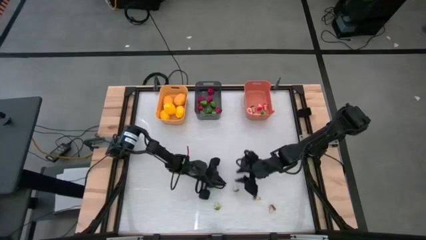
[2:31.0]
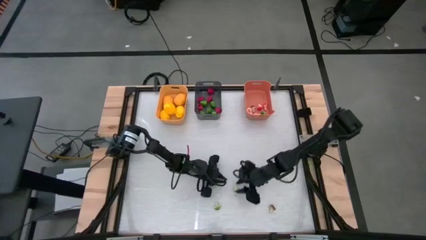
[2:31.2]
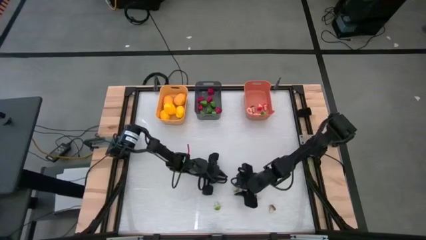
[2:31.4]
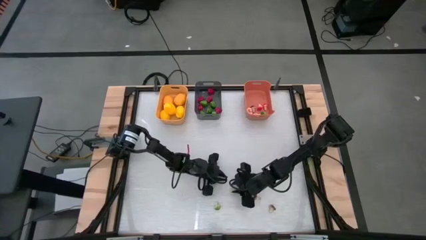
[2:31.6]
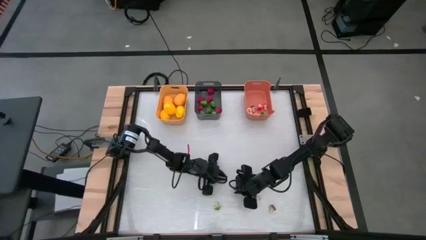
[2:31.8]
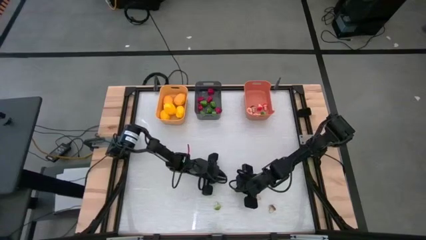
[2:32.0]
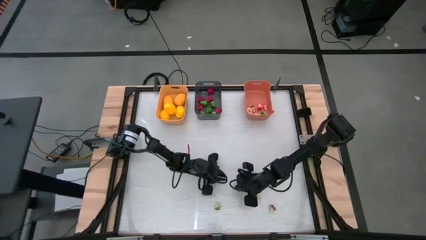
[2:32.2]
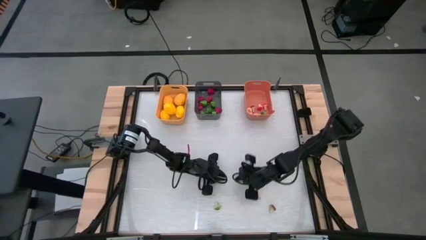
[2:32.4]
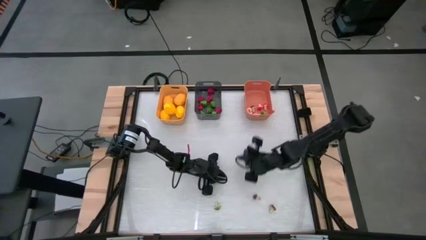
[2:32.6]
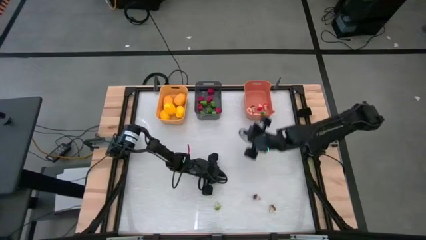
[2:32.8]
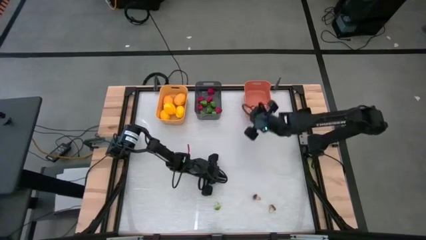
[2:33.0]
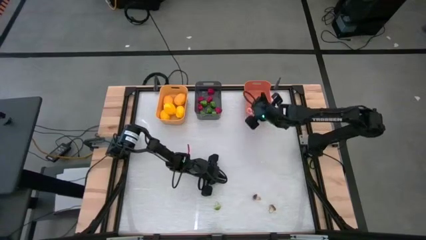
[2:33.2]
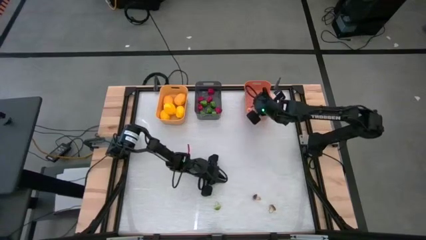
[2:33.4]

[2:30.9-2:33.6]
Task: Sort produce into baskets
Put the green mushroom into the orange bin

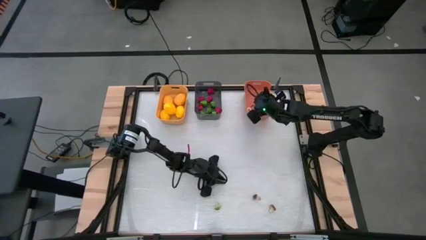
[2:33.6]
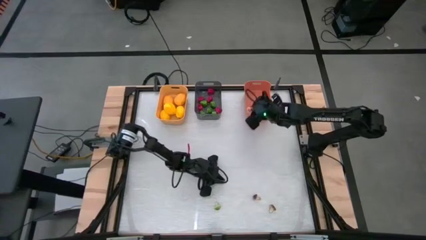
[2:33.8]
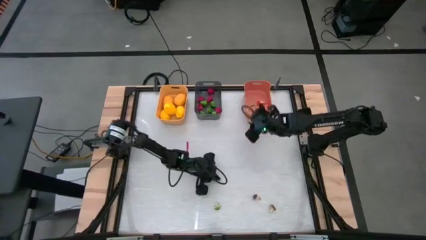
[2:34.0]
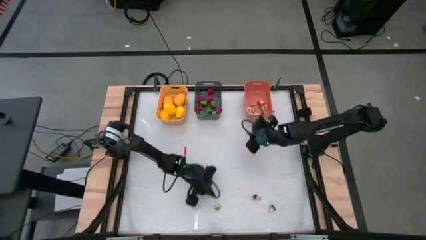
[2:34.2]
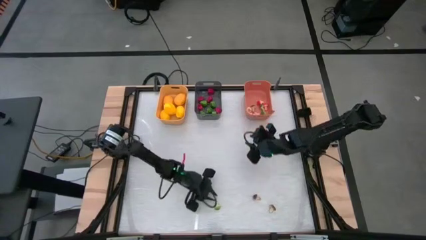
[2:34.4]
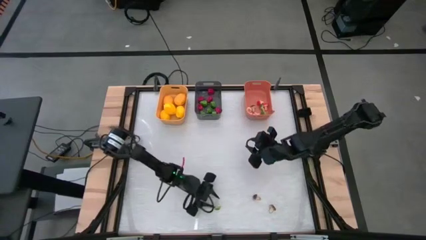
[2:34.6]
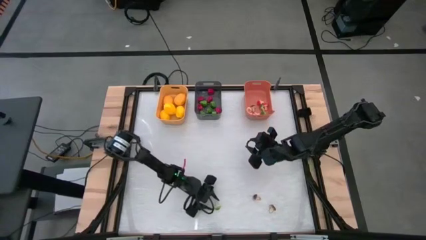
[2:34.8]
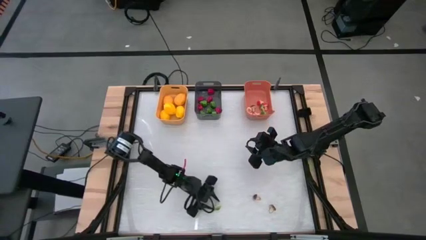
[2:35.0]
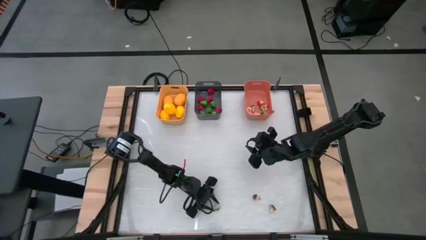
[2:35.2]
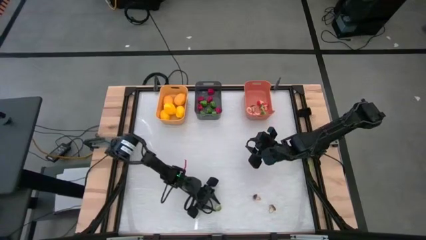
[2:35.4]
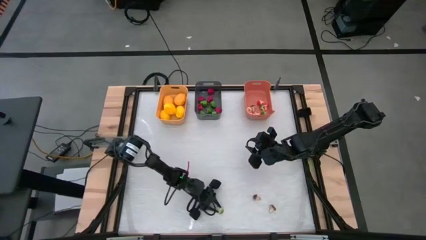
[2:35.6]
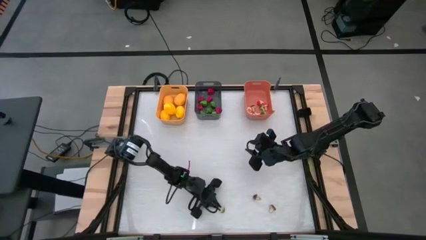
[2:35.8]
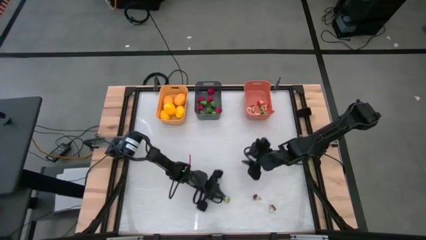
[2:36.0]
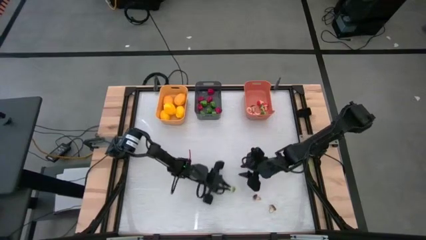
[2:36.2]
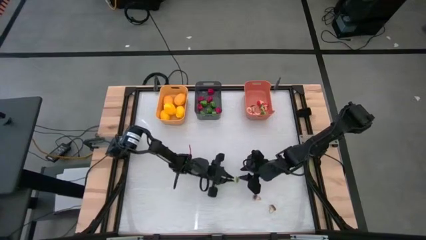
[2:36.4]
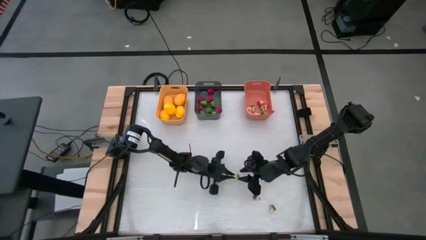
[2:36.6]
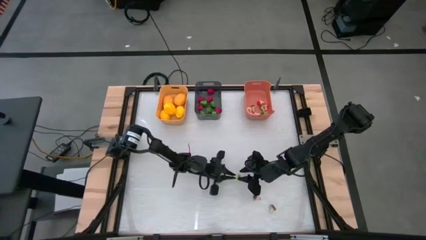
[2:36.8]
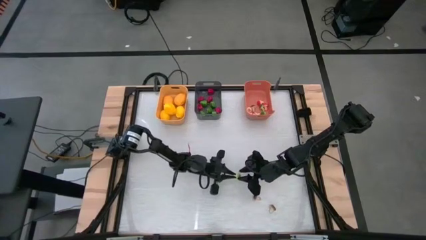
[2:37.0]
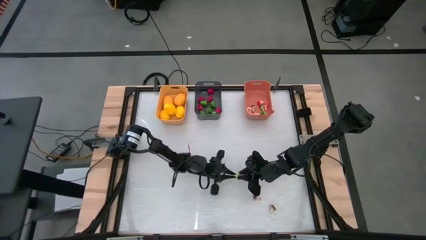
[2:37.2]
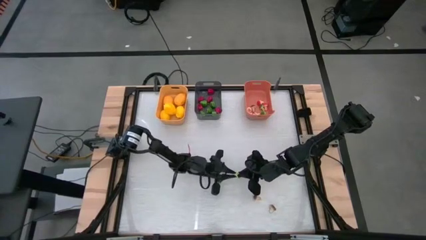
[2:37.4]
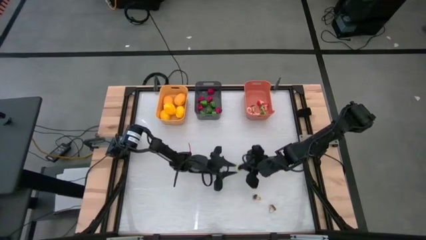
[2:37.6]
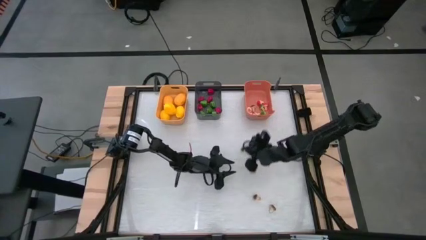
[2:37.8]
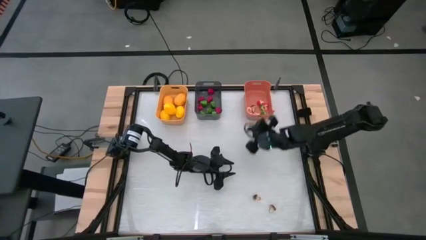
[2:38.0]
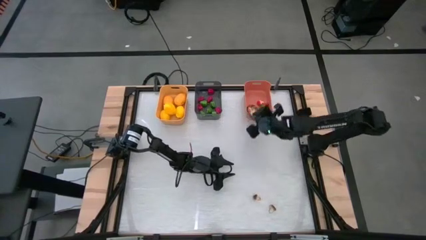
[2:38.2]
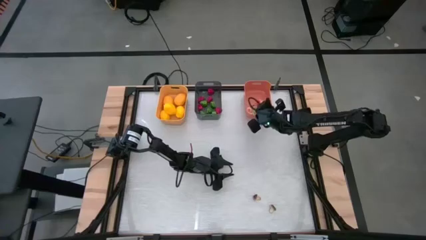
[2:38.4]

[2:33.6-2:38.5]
Put the green mushroom into the orange bin

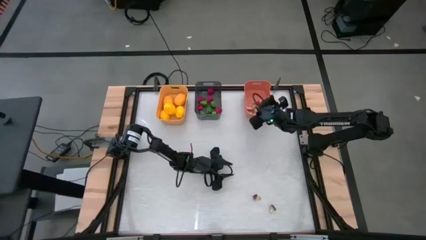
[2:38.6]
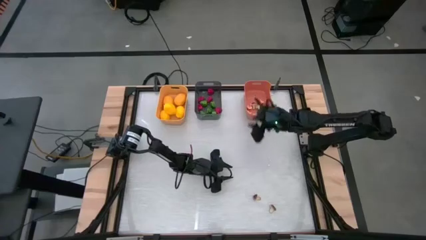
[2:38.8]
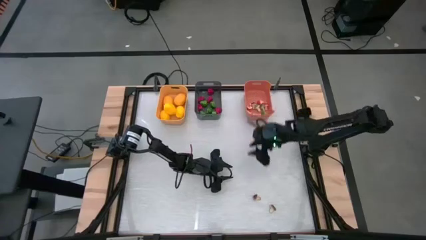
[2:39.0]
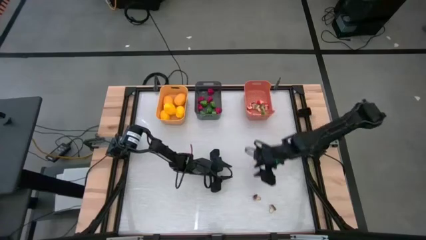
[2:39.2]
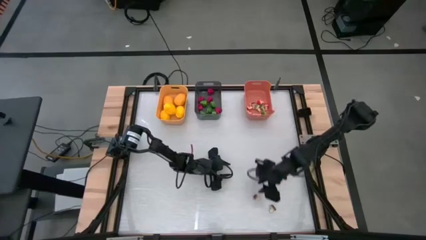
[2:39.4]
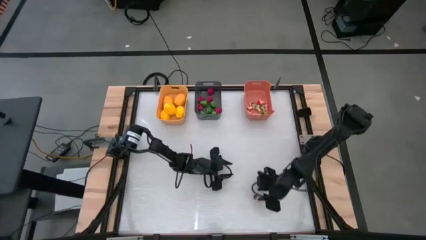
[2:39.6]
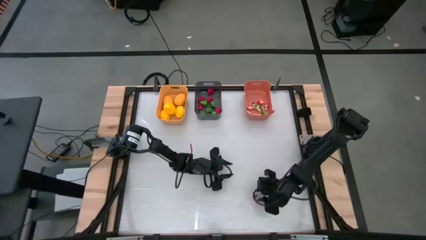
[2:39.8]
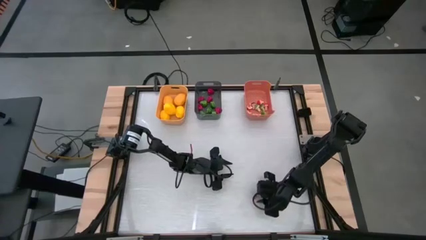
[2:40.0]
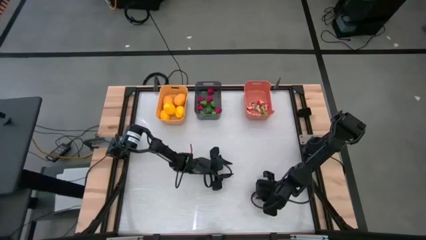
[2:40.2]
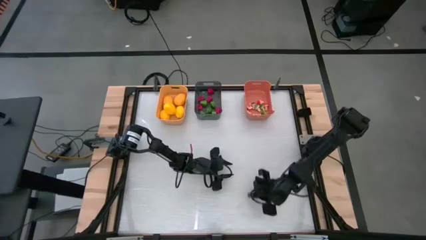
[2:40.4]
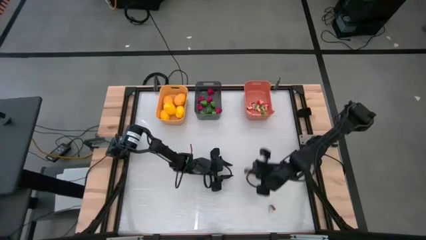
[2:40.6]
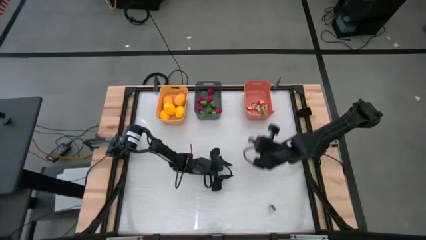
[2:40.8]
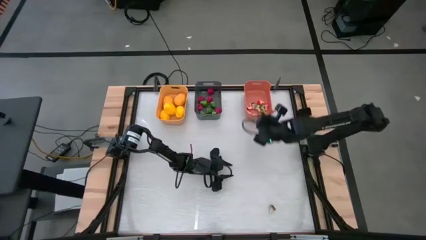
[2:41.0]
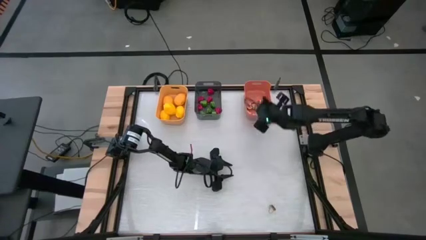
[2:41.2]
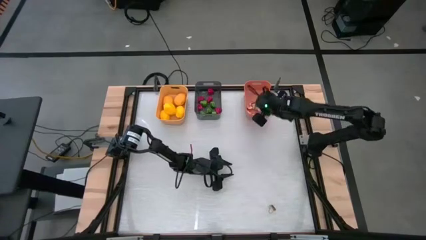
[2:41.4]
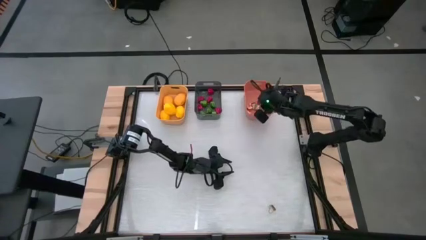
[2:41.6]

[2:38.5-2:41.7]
Put the brown mushroom into the orange bin

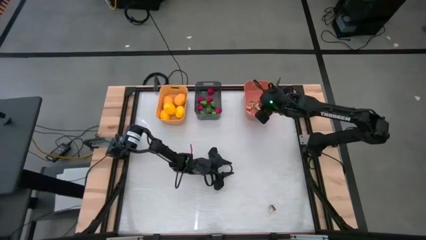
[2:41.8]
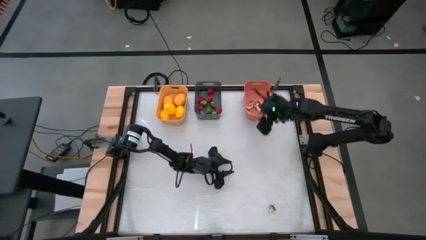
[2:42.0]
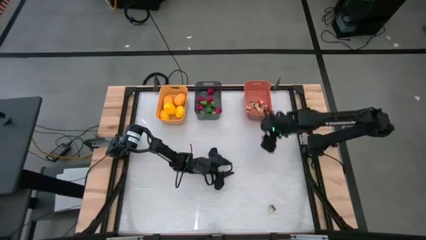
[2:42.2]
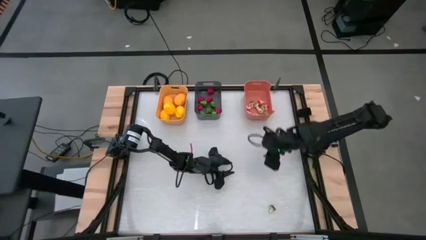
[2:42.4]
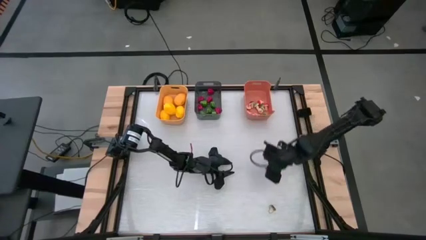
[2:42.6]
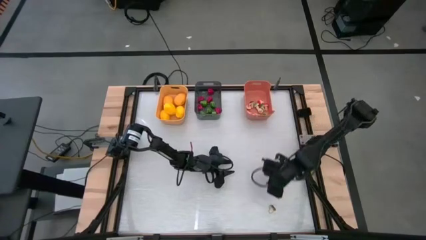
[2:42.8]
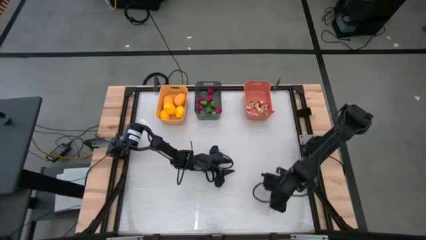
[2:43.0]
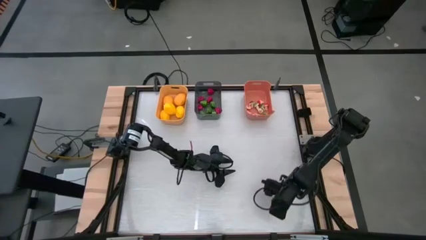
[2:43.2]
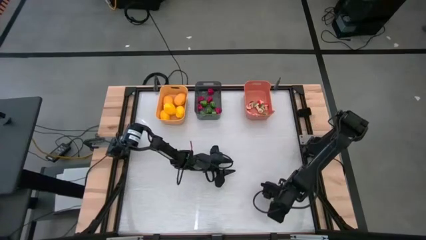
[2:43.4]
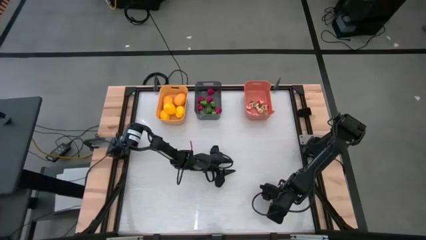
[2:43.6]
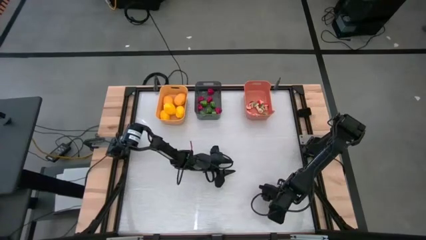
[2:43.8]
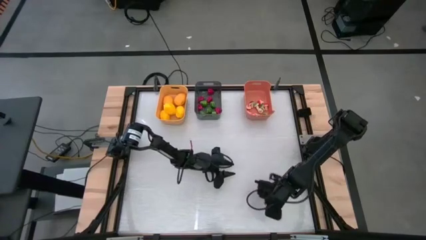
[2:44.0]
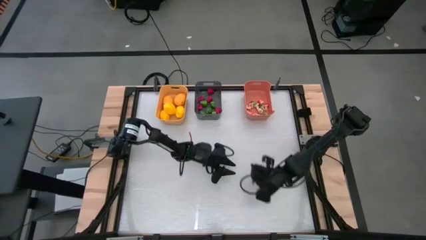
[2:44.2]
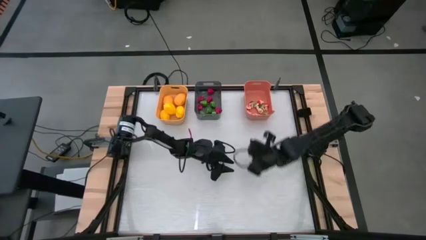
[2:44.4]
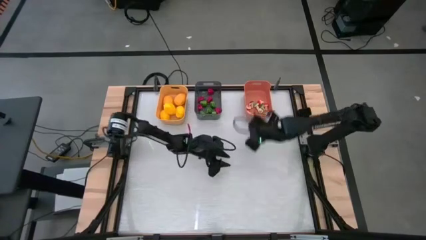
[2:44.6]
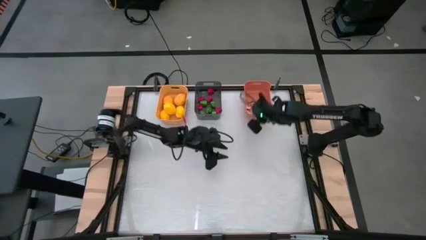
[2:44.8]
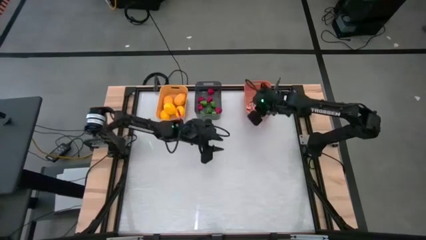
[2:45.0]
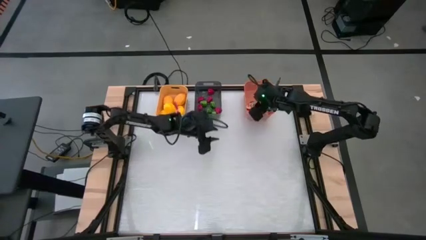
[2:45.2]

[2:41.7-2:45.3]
Put the brown mushroom into the orange bin

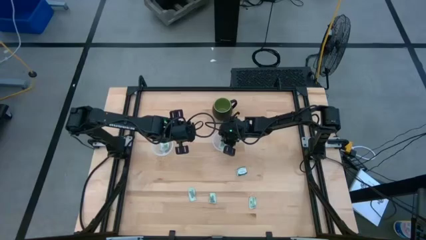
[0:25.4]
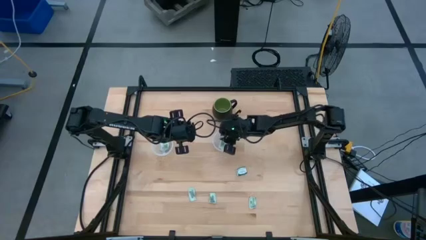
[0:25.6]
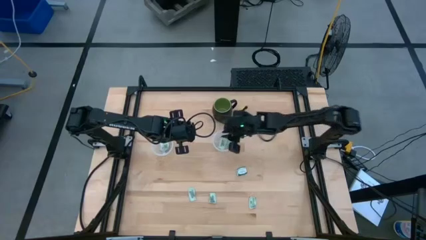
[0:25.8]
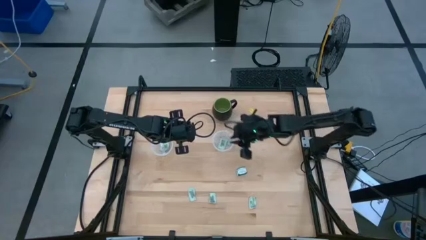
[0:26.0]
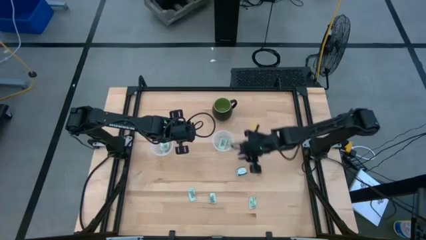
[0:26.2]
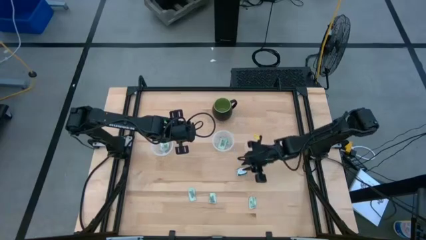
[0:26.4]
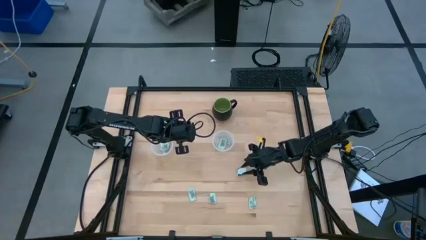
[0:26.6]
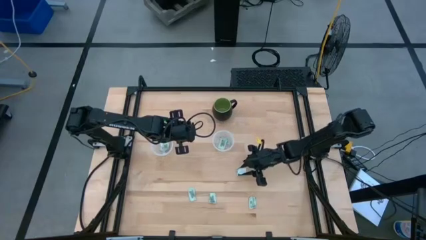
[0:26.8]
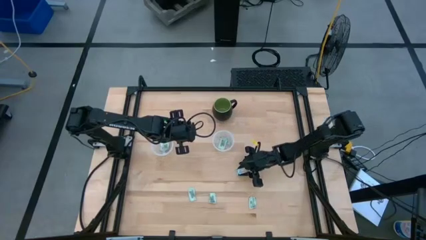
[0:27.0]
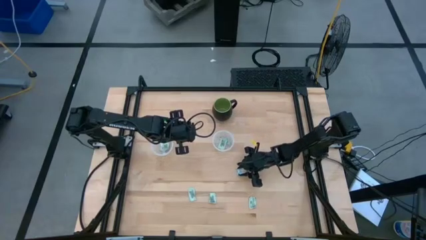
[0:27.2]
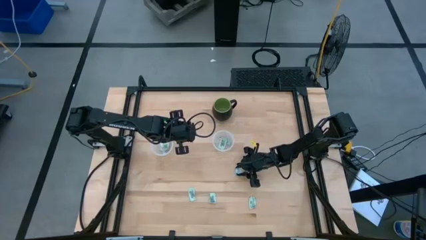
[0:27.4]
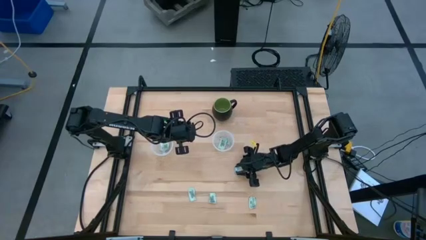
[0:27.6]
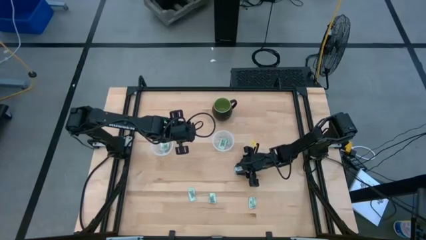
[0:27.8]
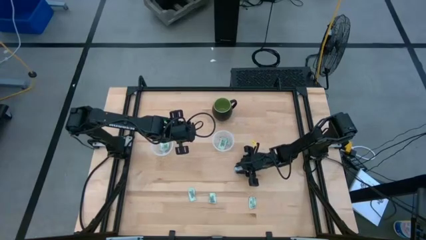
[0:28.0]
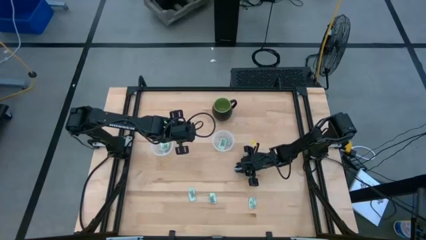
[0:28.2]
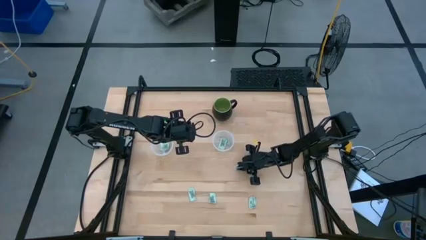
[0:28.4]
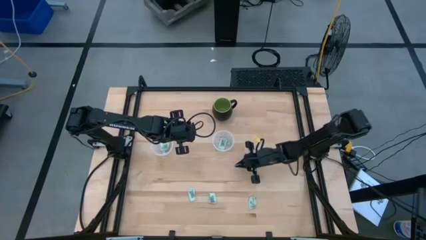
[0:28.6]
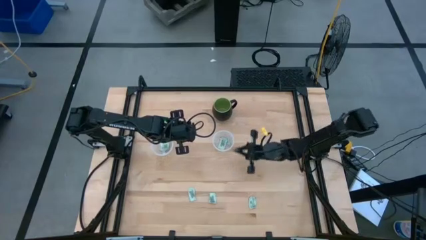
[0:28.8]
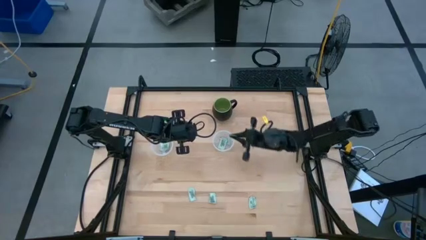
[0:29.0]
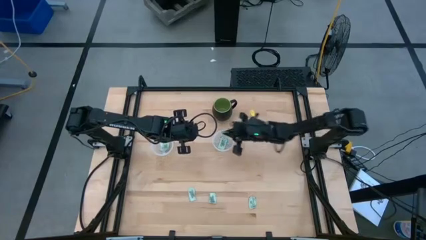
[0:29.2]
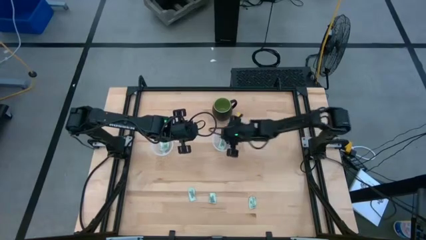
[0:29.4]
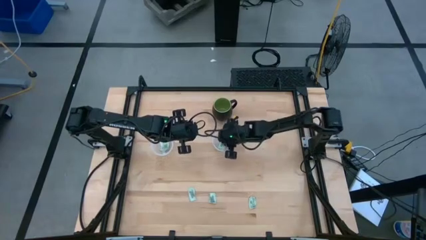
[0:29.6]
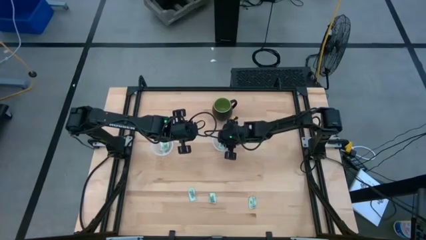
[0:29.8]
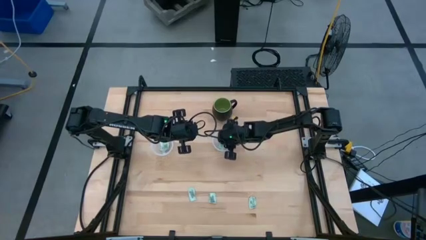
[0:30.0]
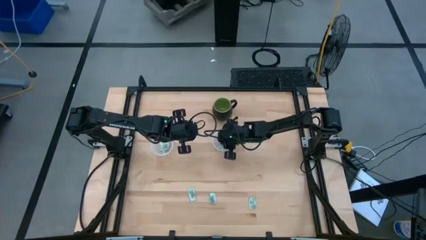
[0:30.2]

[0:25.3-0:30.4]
Task: Pick and place Stevia / Truvia into bins
Put the green truvia packet into the right transparent container
